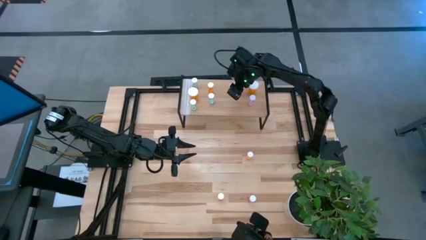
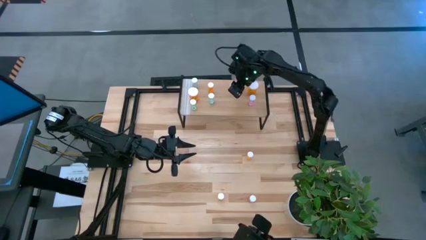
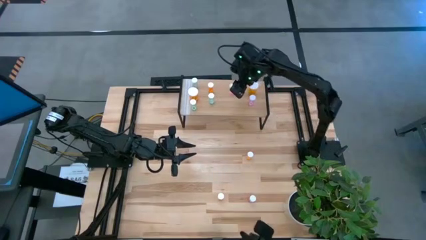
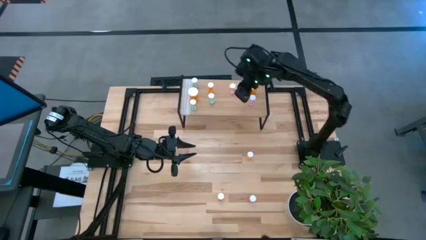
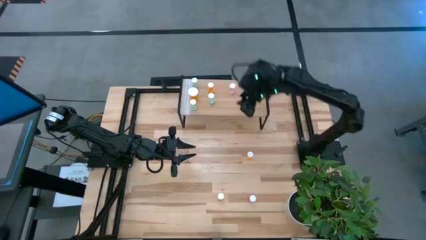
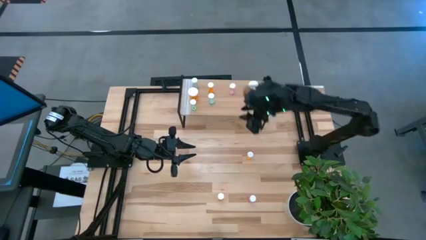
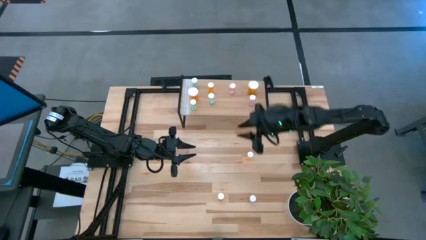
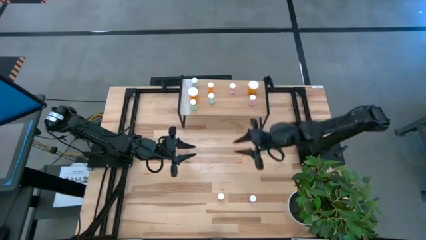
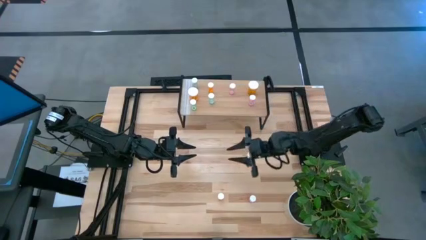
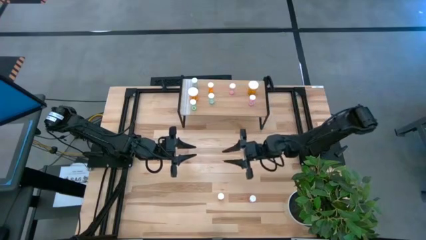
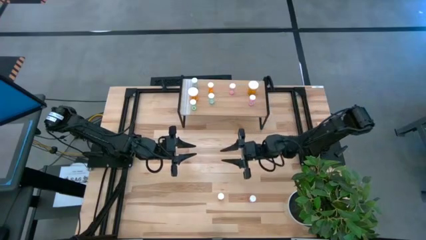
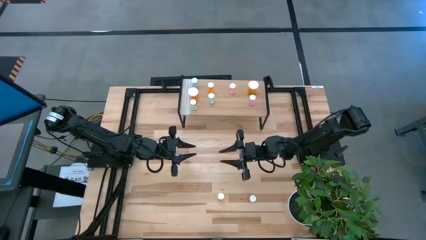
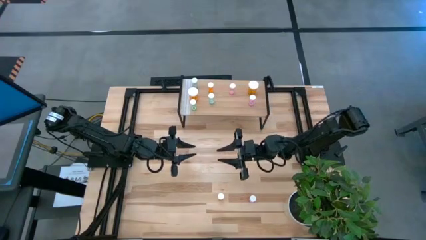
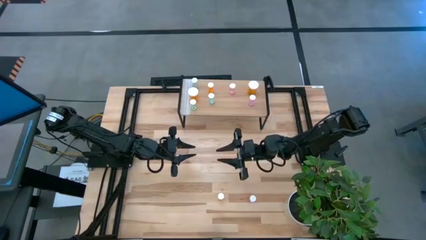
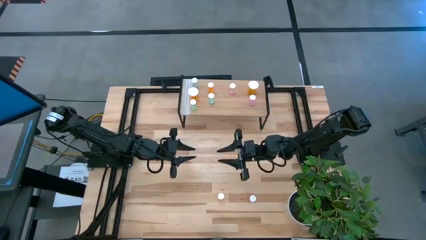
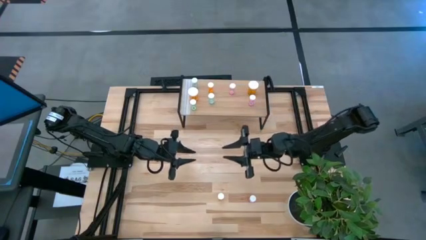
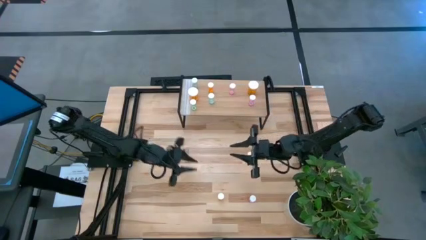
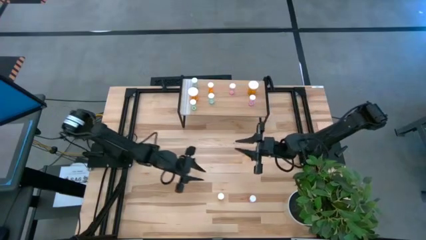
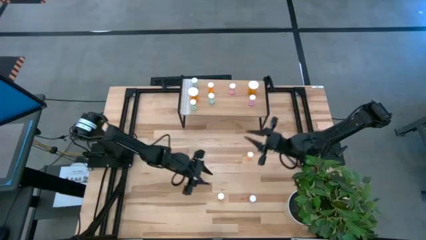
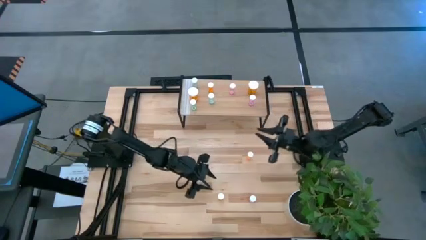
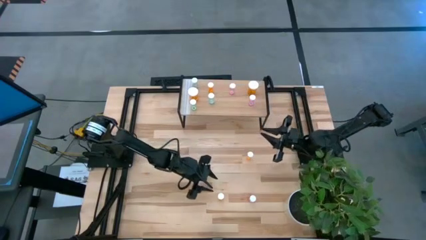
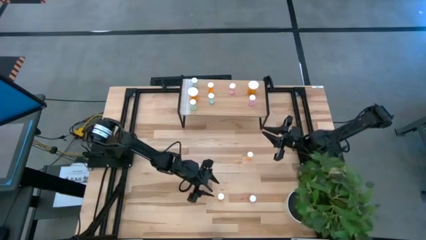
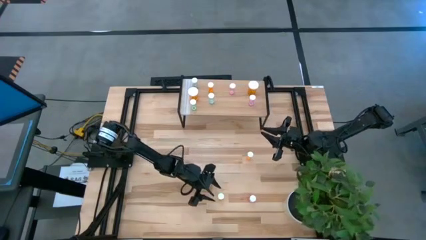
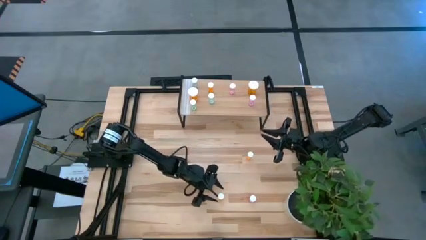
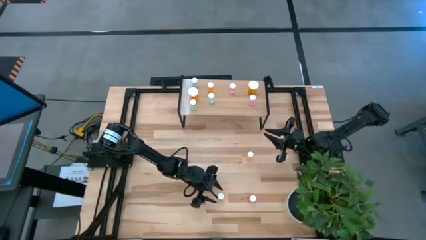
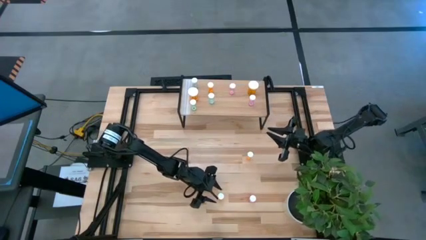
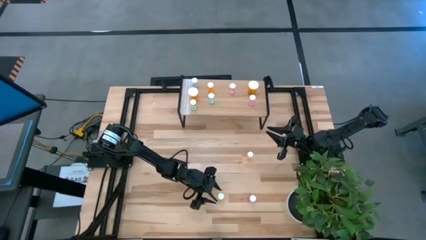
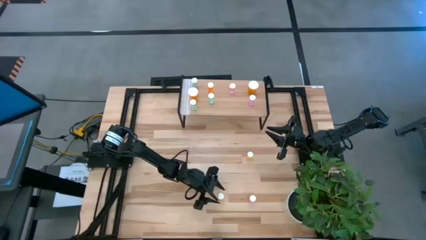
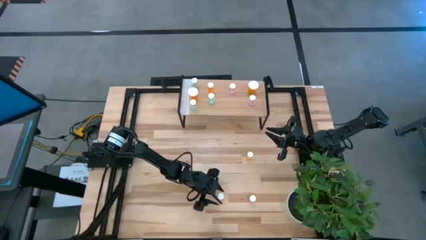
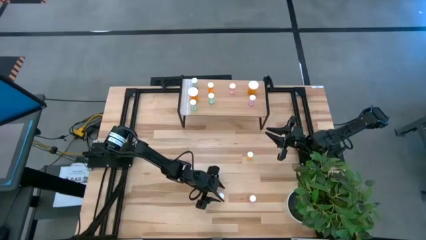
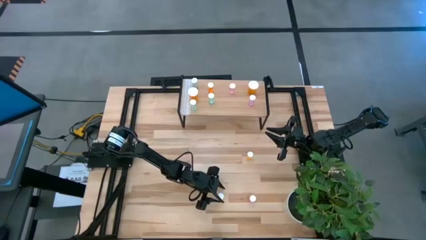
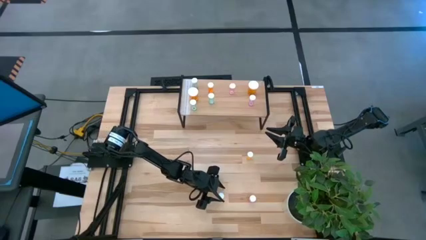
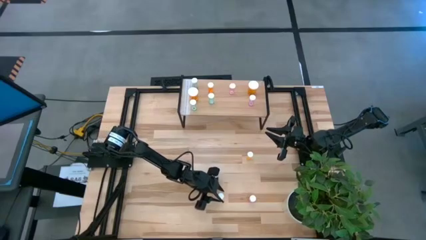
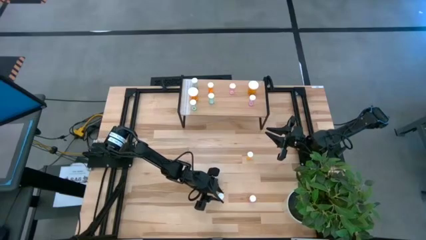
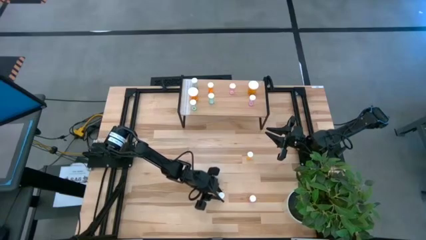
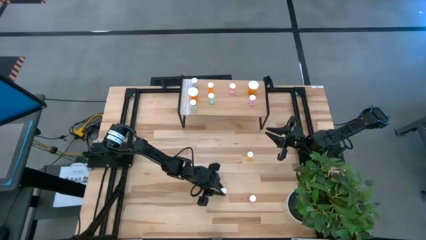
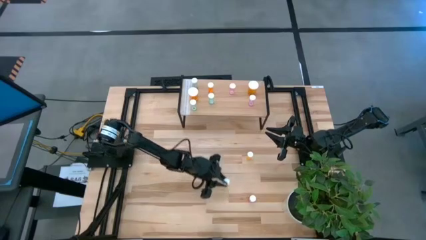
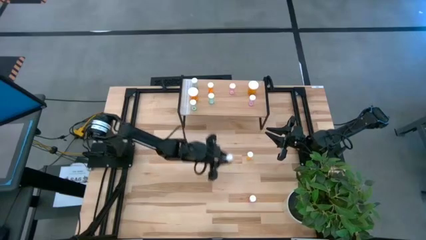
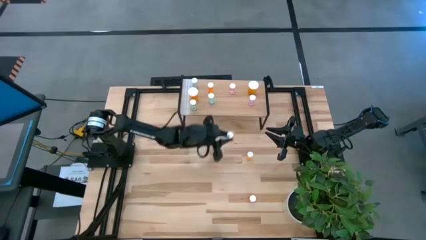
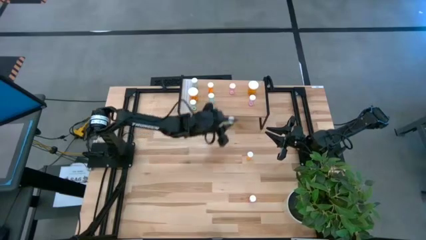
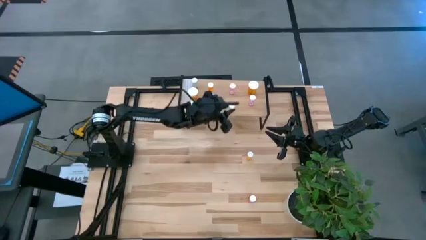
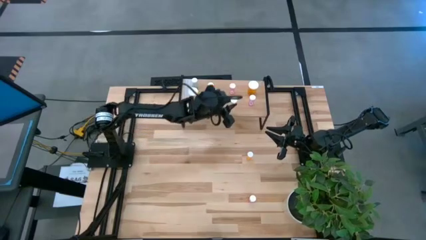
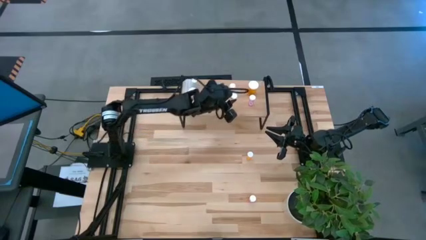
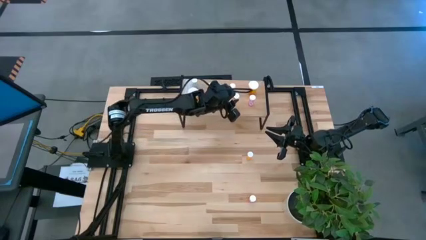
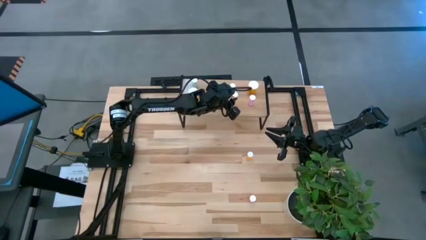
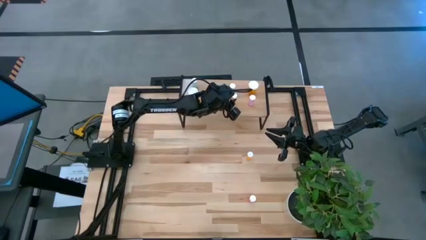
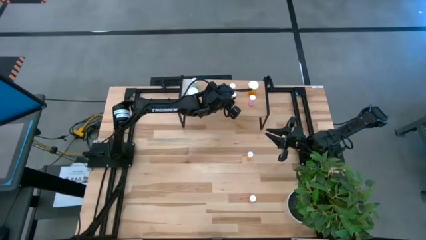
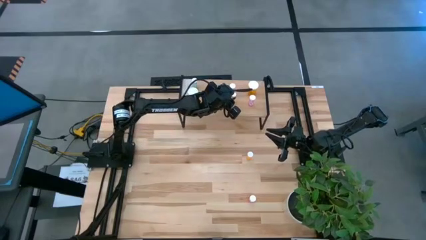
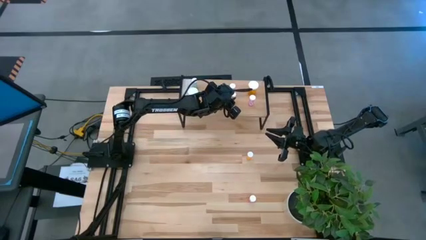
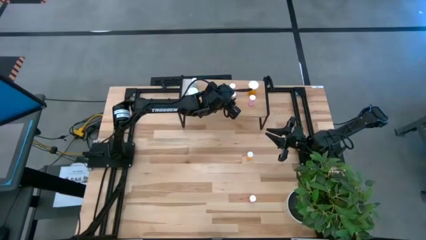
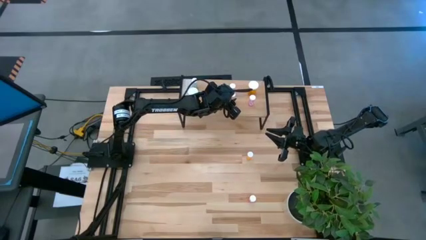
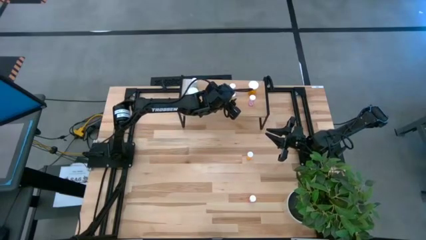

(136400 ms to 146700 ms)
Task: Pick and place medicine bottles onto shelf by color
Put the bottom small orange pill bottle on the shelf

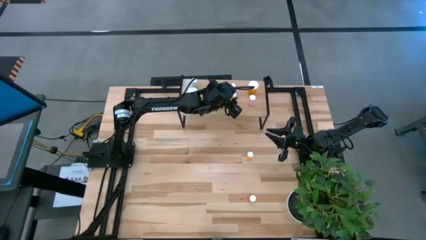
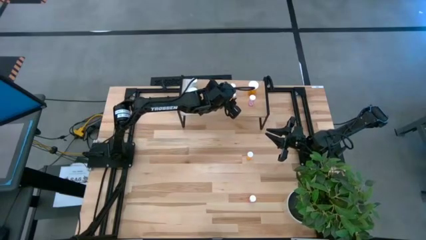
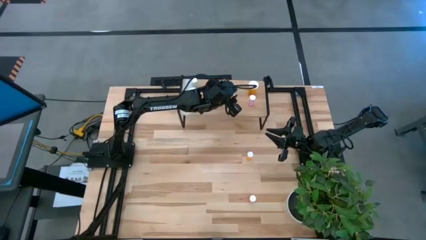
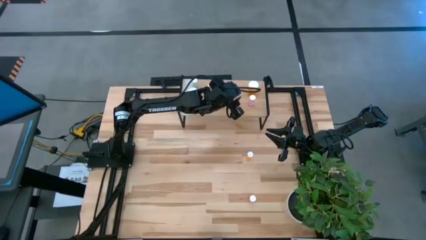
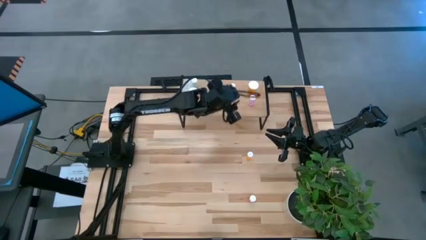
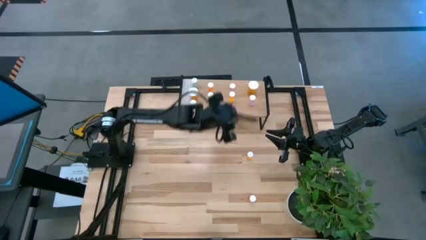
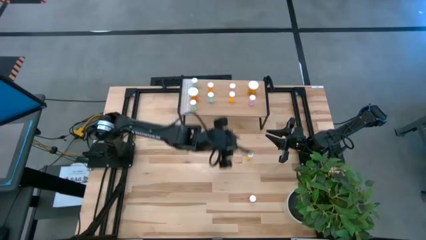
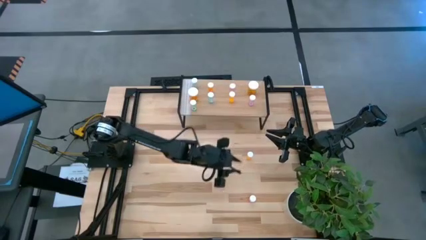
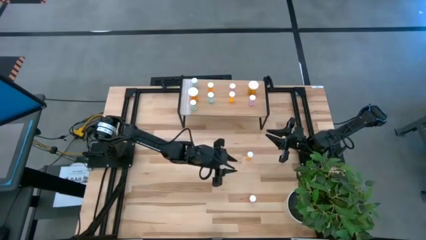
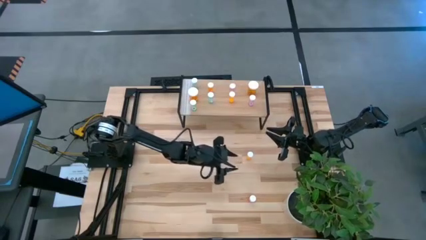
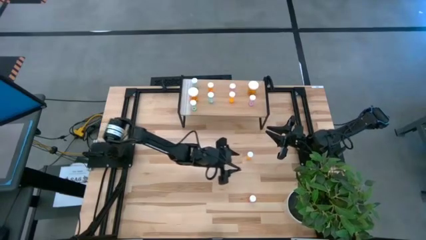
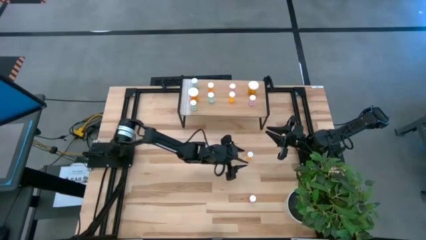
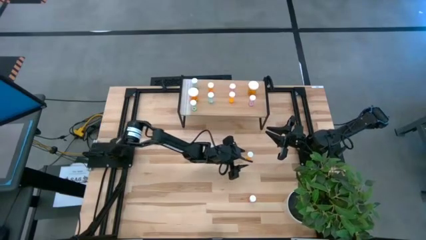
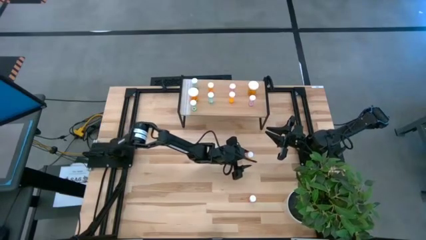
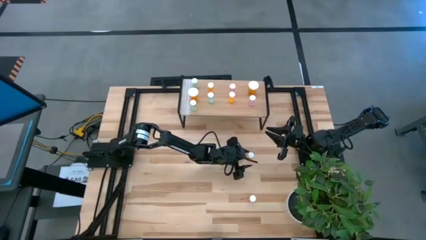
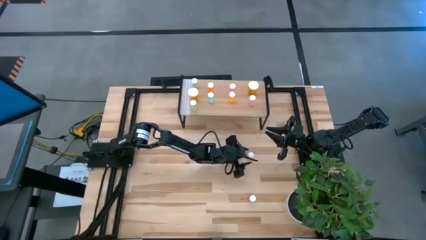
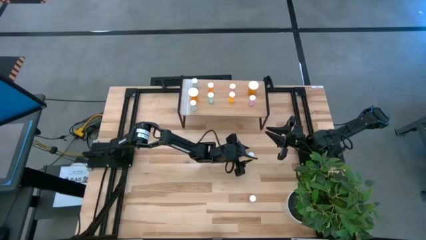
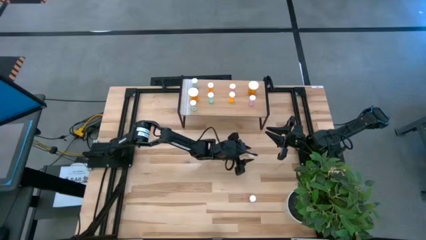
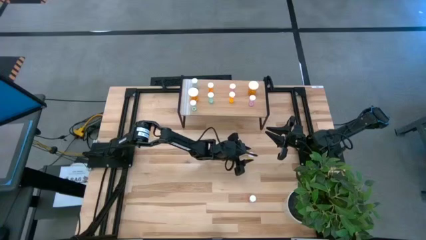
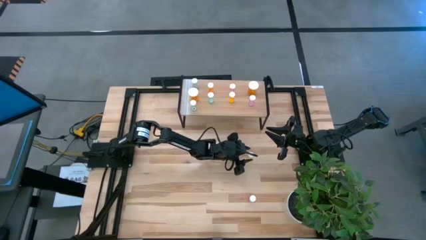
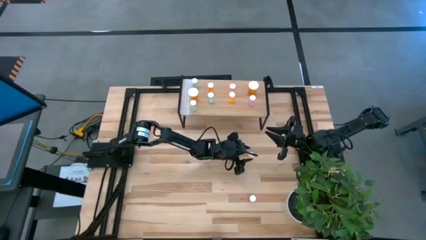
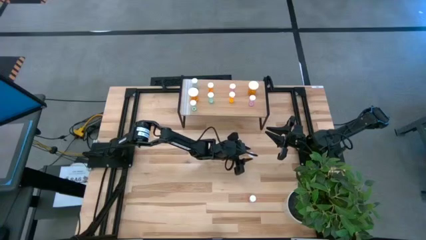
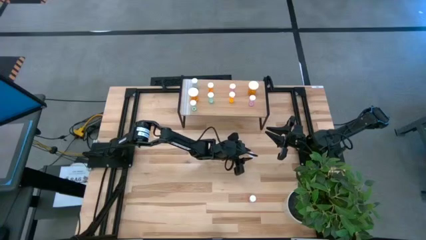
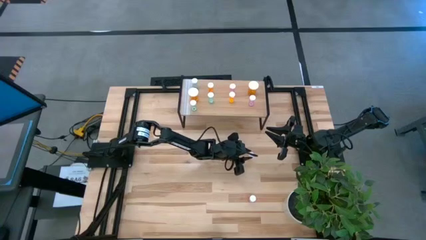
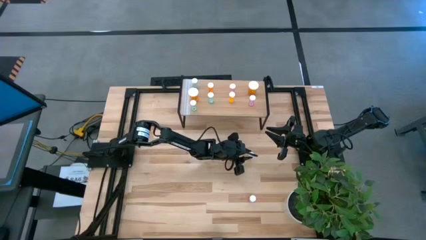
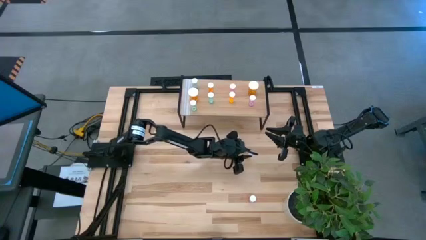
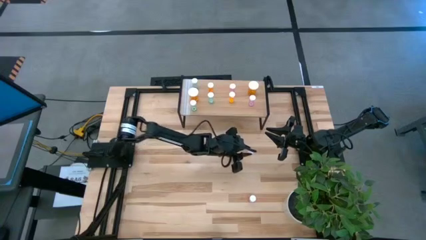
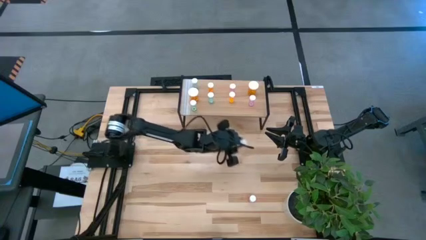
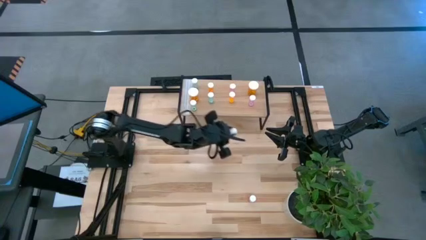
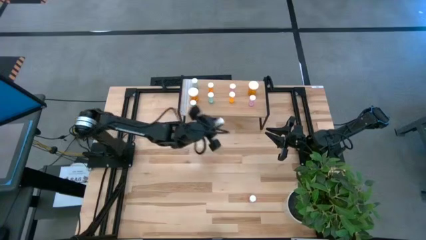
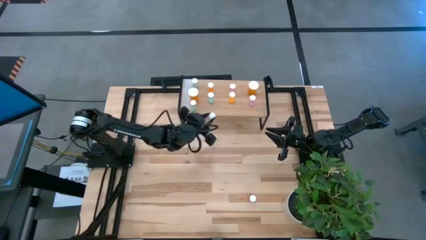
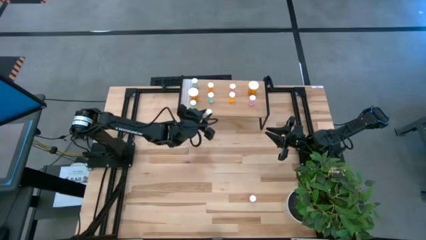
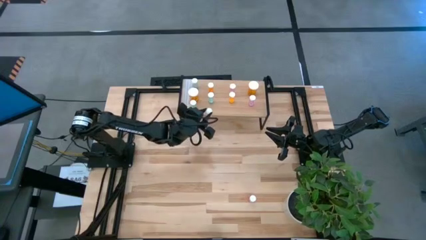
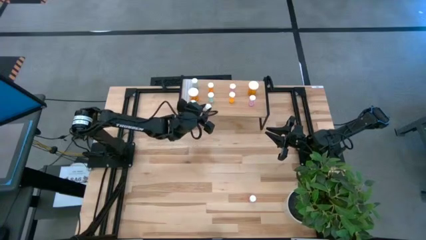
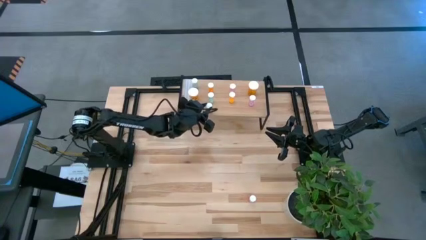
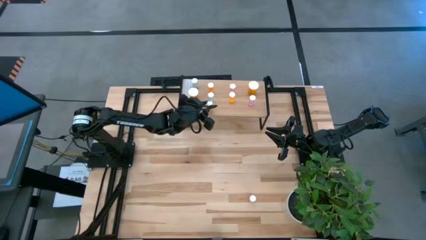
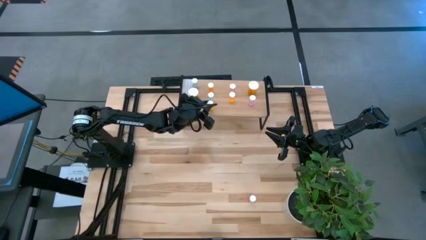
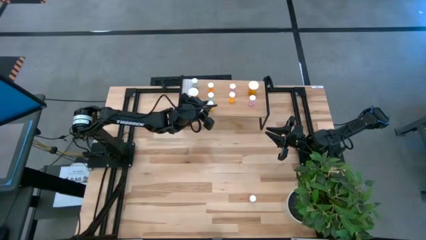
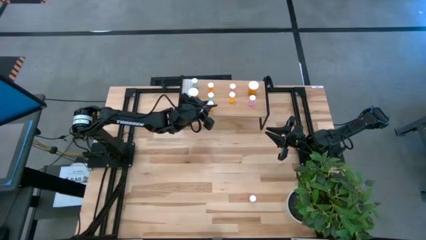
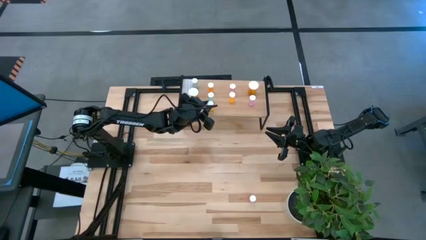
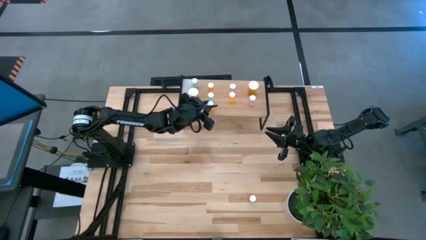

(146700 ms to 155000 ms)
Put the small orange pill bottle on the shelf
